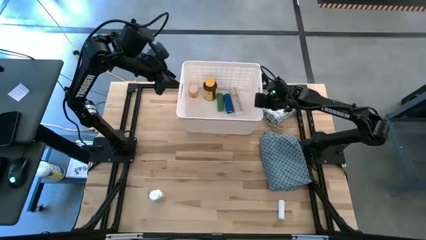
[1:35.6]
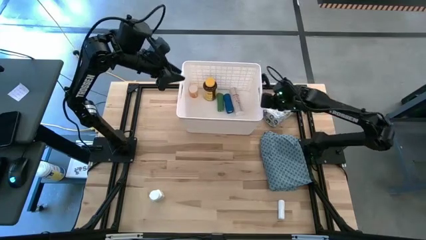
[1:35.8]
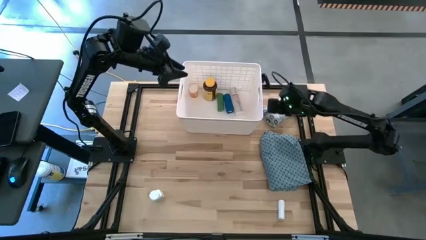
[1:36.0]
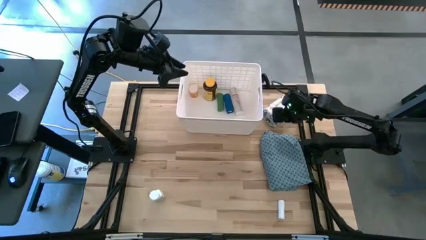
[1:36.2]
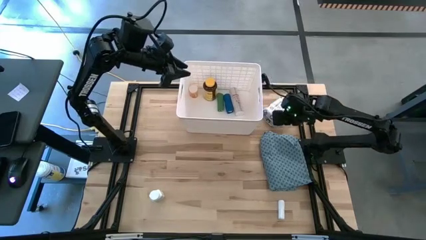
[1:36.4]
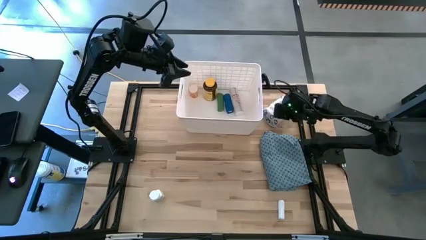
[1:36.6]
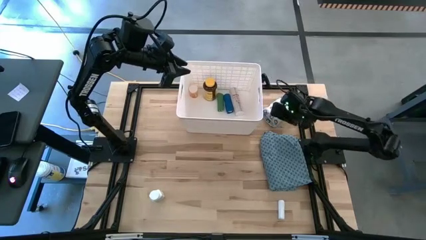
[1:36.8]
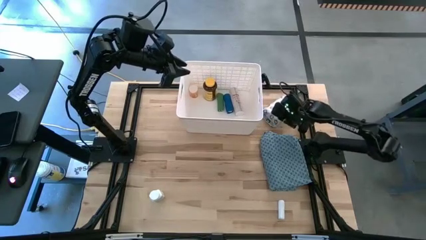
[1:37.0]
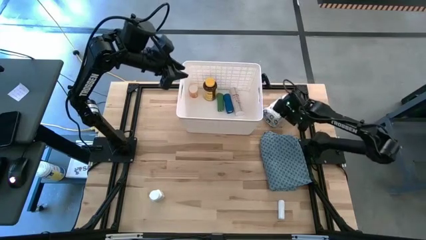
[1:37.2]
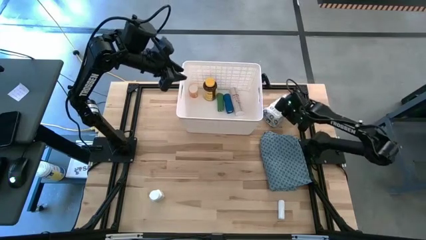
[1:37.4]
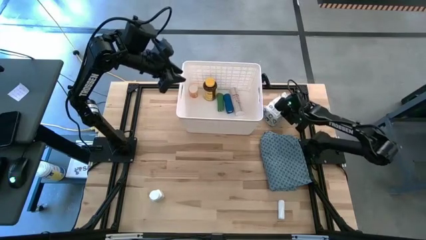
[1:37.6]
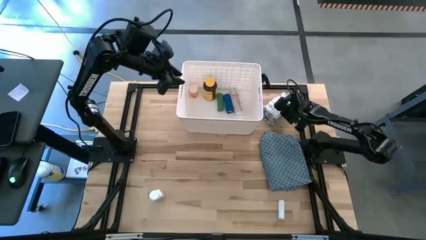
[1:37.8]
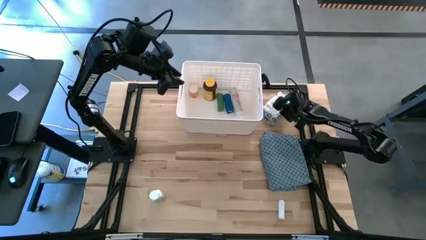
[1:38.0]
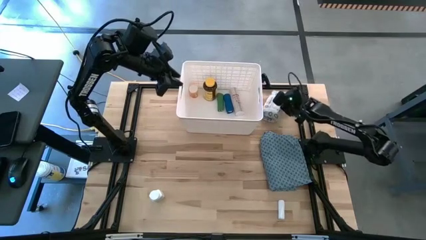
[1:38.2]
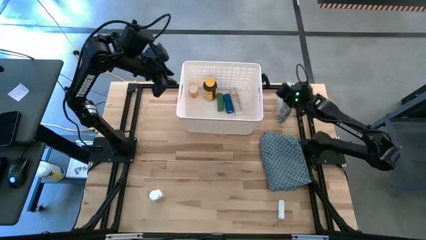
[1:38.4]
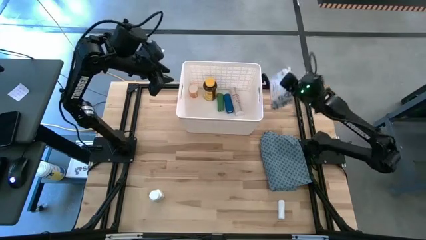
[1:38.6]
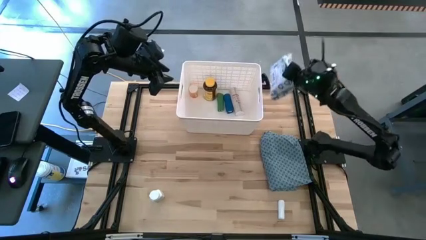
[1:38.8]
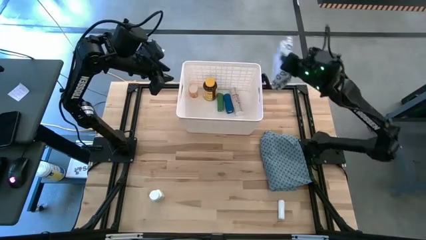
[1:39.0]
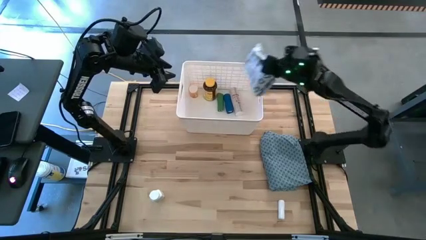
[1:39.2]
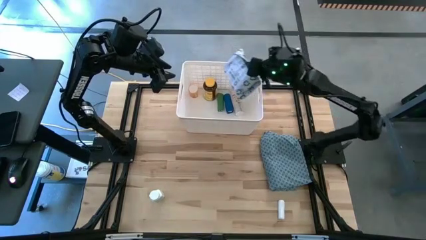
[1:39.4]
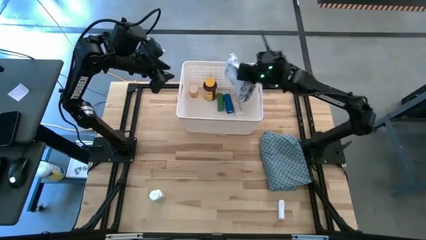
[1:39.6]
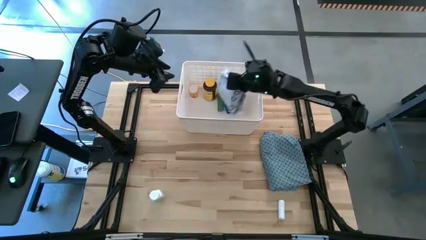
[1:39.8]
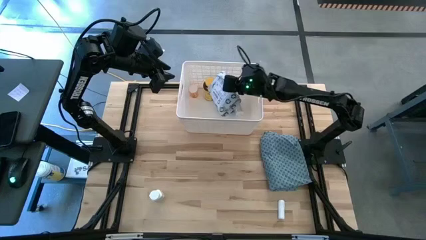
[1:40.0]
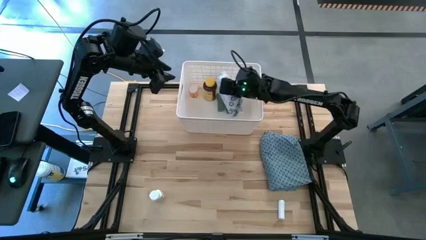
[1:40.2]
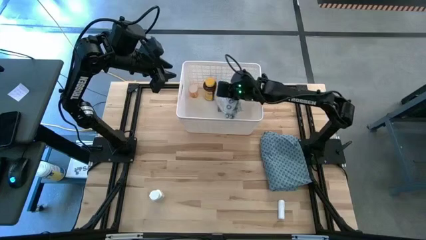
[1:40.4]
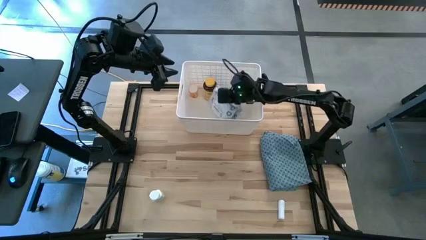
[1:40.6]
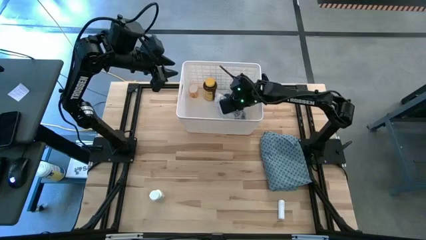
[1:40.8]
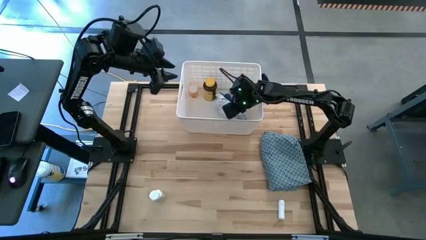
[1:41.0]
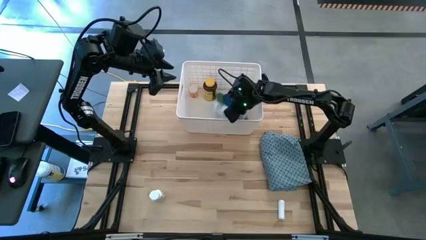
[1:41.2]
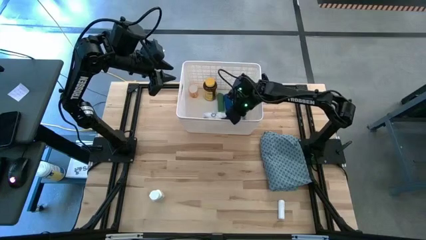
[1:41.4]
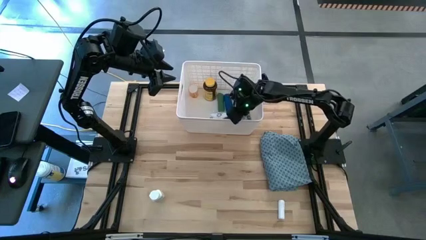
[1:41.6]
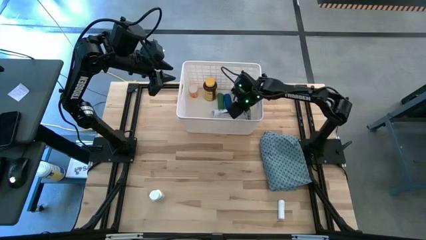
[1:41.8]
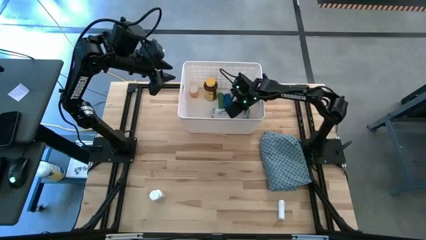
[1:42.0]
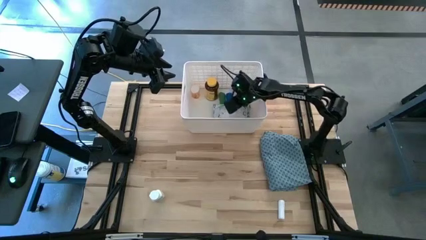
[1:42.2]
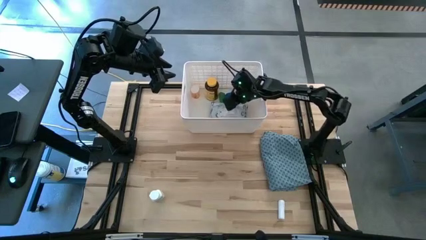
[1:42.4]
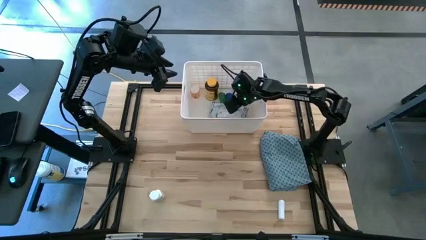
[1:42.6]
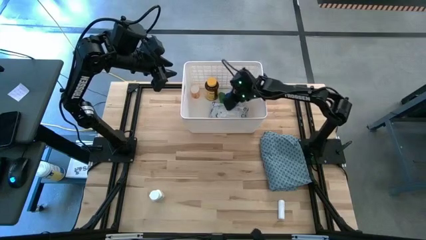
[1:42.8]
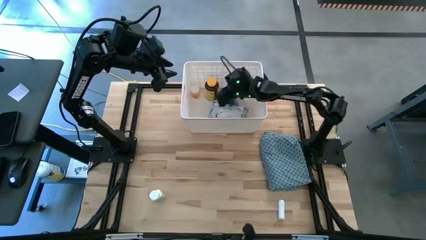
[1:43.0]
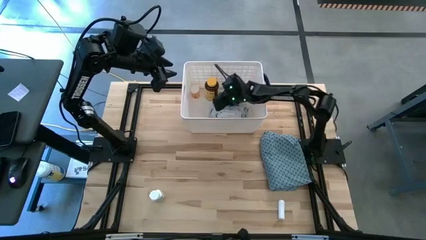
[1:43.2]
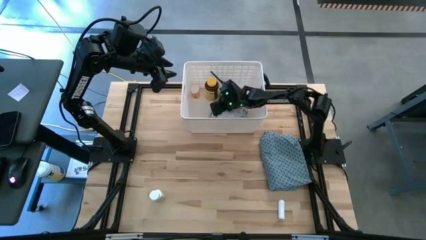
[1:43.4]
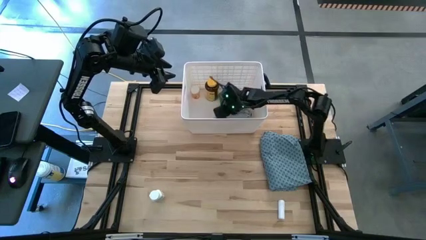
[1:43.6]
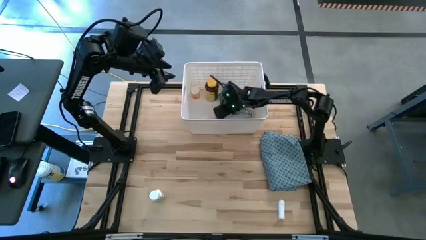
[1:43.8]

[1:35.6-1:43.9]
Task: Pick & place medical supplies in basket/bin
Put the white mailer bag into the white bin

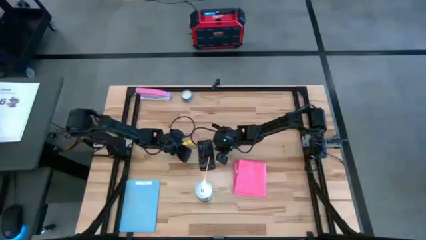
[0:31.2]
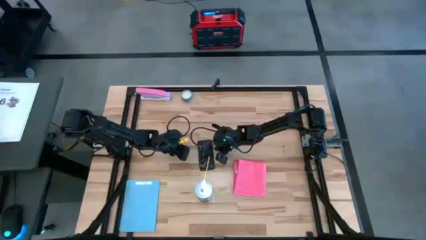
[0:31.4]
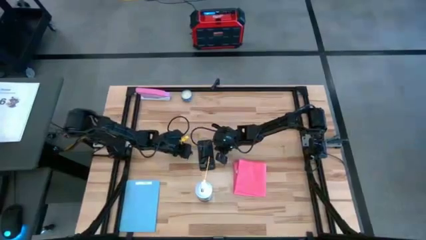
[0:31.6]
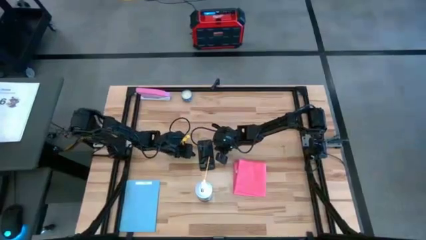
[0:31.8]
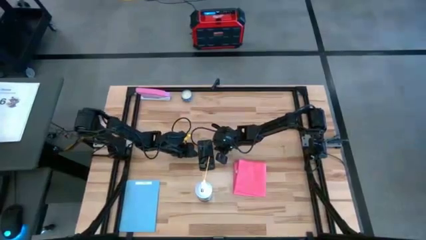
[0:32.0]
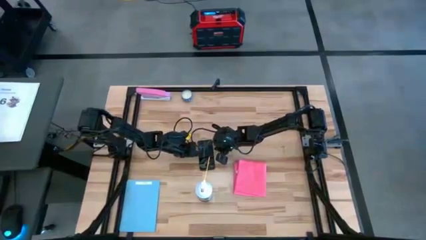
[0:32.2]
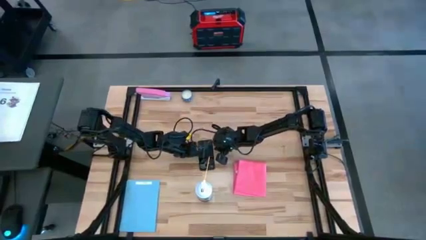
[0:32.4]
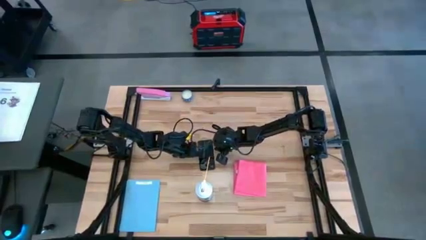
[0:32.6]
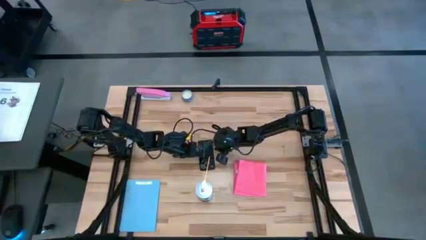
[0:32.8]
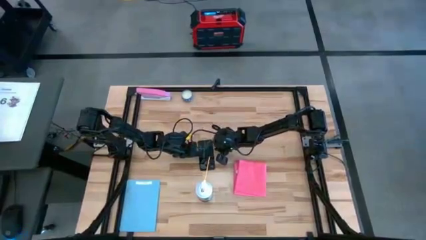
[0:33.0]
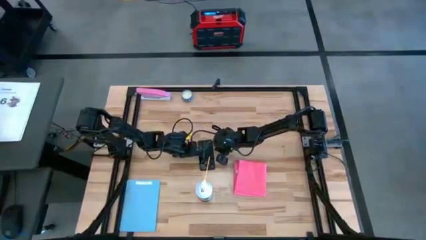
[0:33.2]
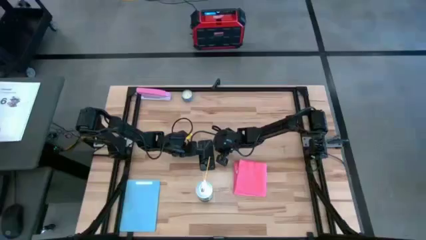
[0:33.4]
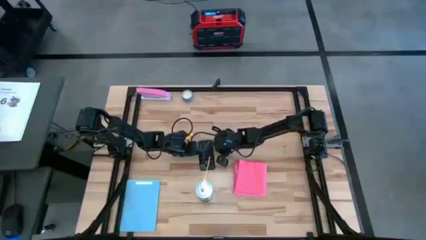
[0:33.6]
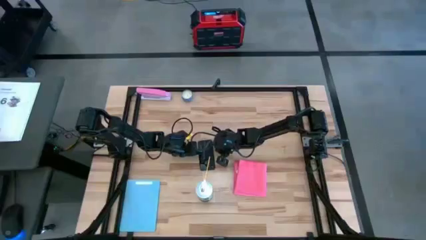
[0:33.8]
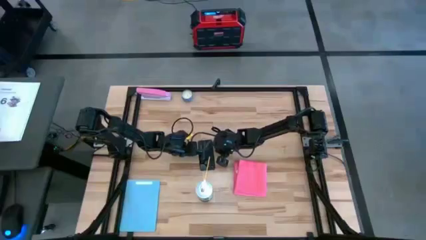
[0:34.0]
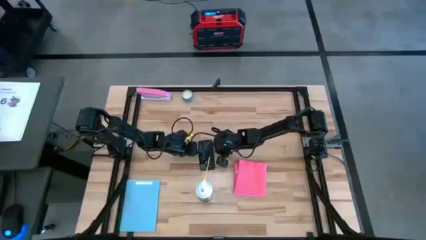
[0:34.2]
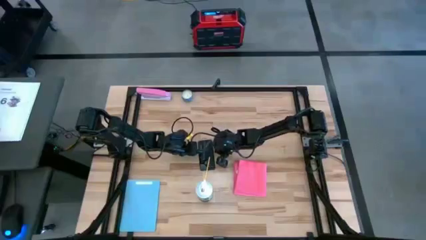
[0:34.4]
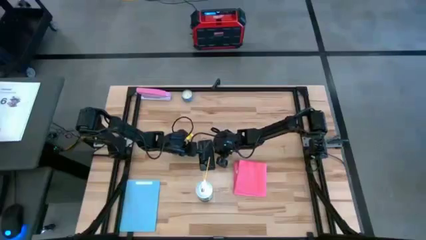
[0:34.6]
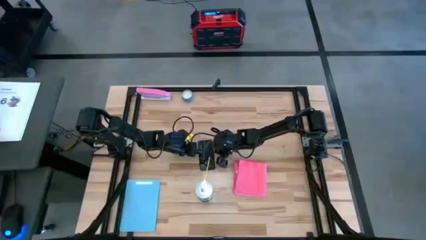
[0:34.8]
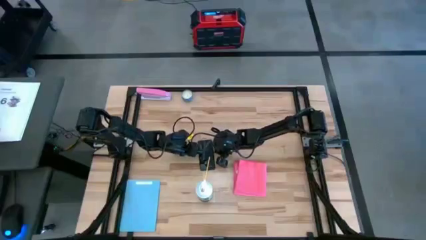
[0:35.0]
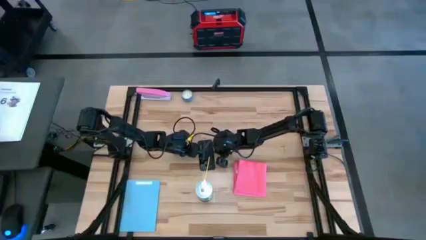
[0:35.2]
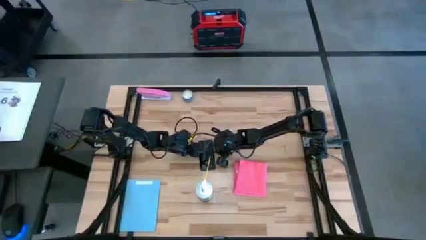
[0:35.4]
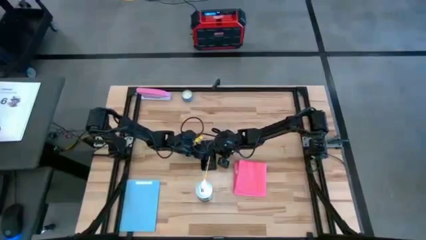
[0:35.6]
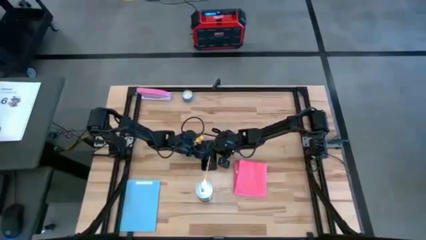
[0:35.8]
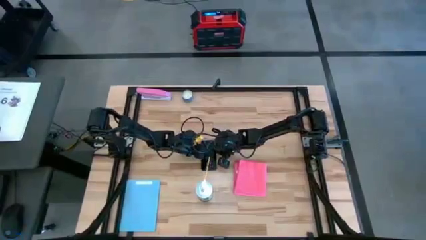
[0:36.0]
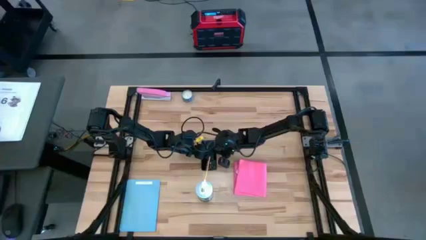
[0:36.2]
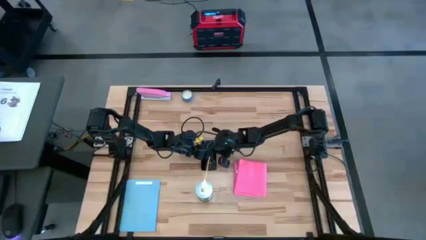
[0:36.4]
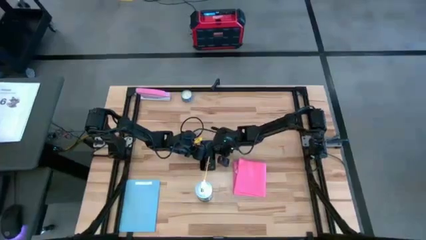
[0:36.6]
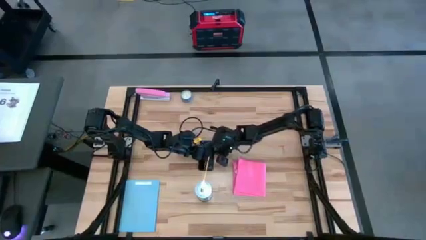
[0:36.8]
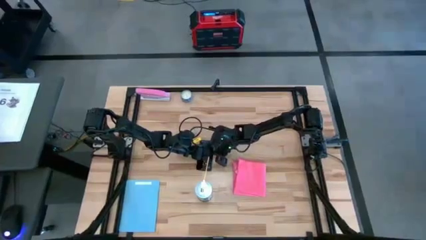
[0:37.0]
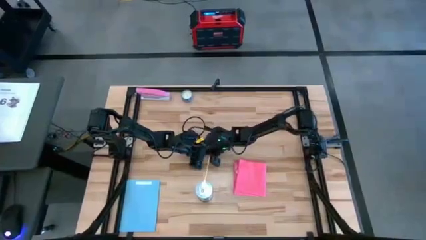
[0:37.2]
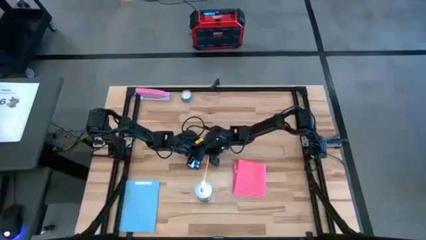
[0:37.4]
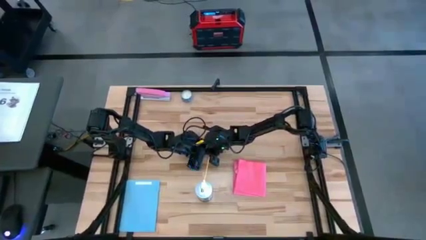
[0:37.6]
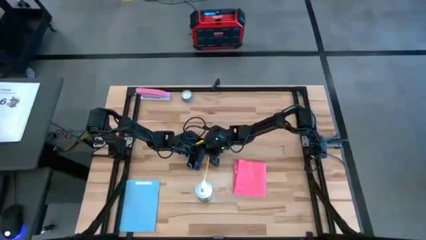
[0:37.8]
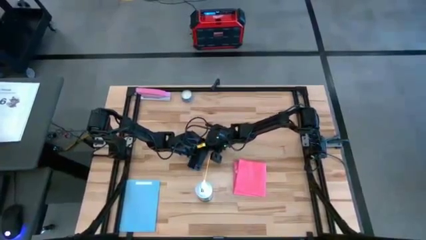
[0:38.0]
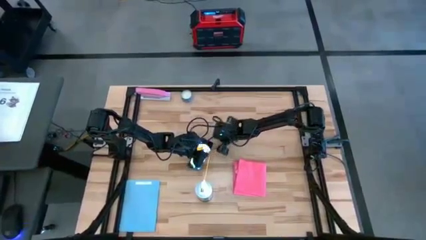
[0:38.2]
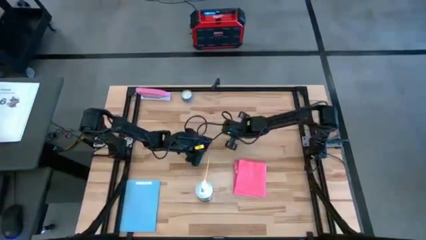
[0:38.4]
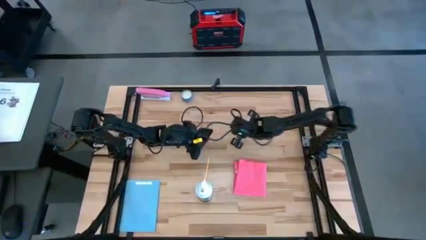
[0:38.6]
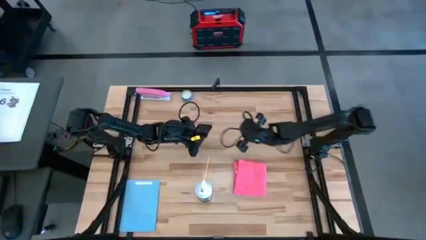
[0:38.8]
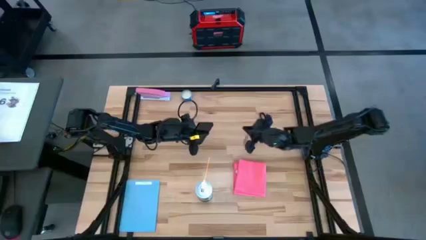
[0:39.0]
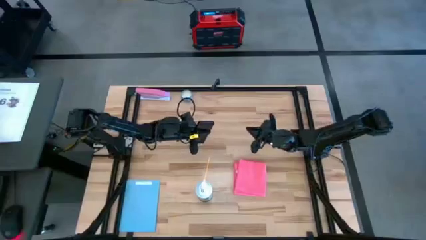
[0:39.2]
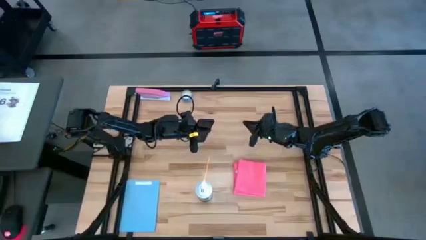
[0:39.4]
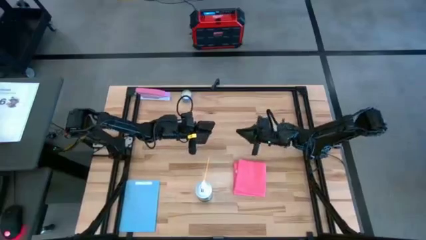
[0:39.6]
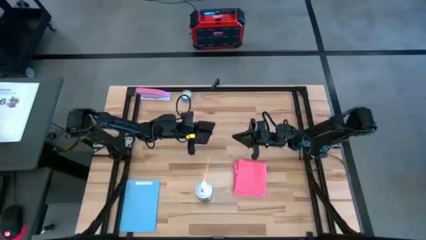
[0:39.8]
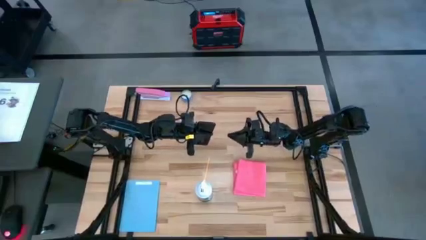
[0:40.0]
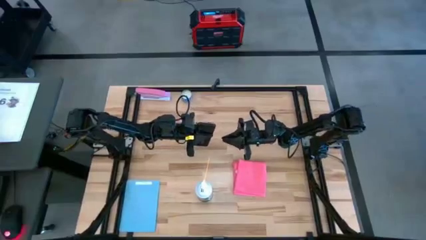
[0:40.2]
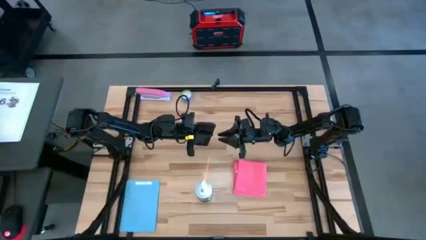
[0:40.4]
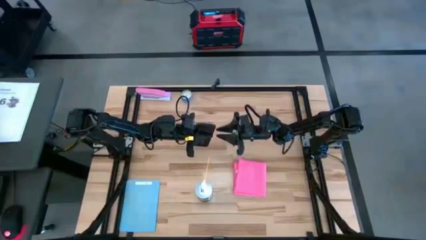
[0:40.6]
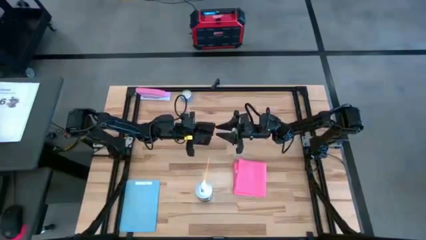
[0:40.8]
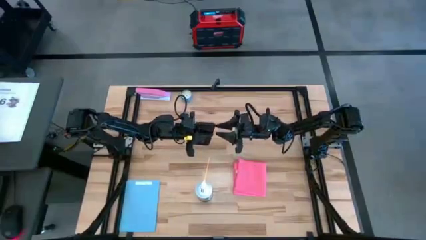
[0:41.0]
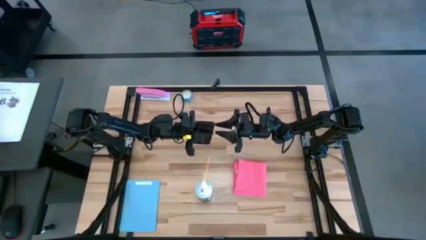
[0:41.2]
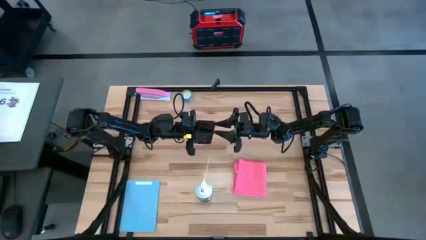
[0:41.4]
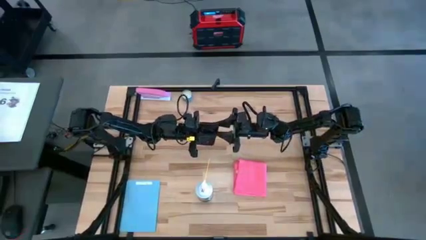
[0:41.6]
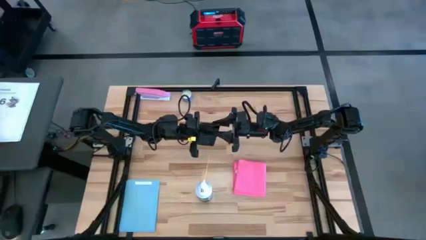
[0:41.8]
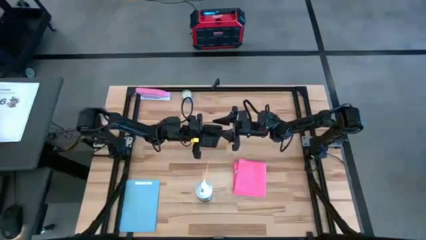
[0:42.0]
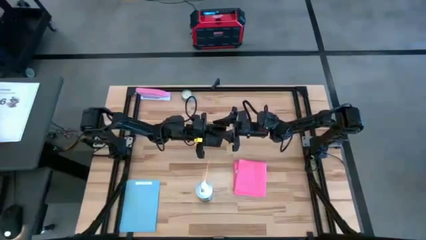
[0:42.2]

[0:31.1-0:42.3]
Task: Apply microfiber cloth
Spray the back of the black cellphone using the spray bottle
